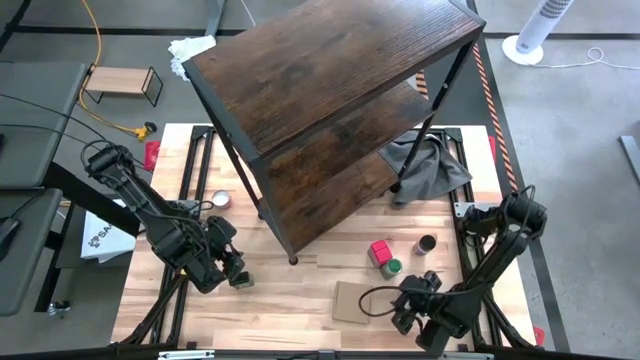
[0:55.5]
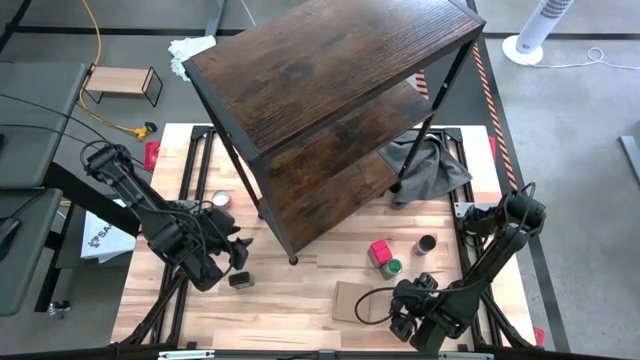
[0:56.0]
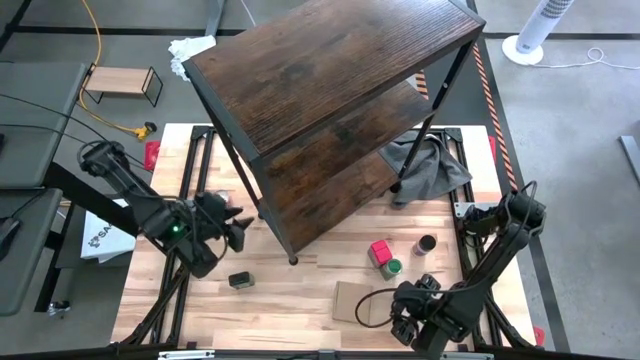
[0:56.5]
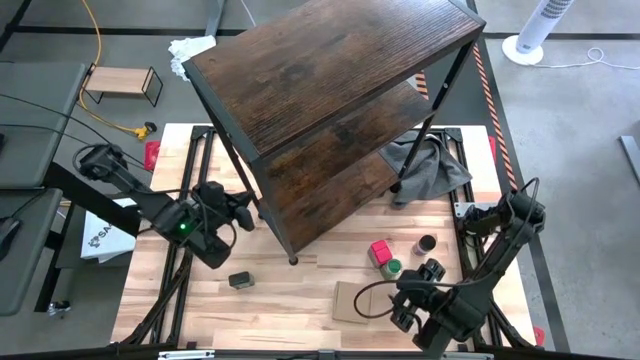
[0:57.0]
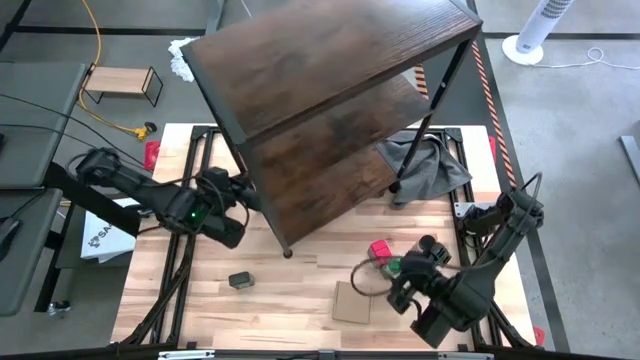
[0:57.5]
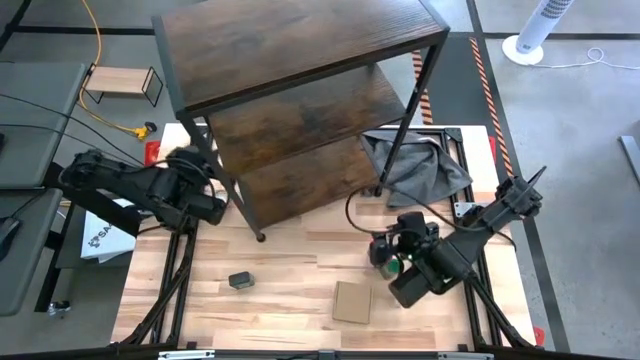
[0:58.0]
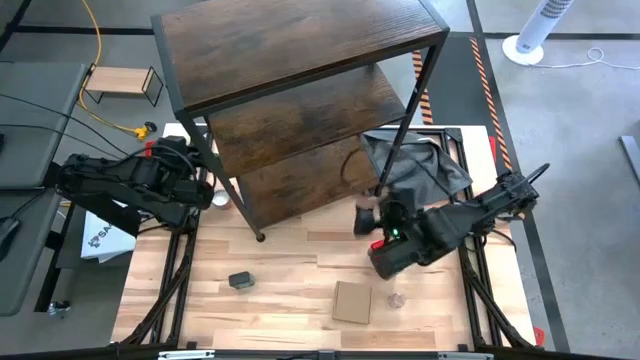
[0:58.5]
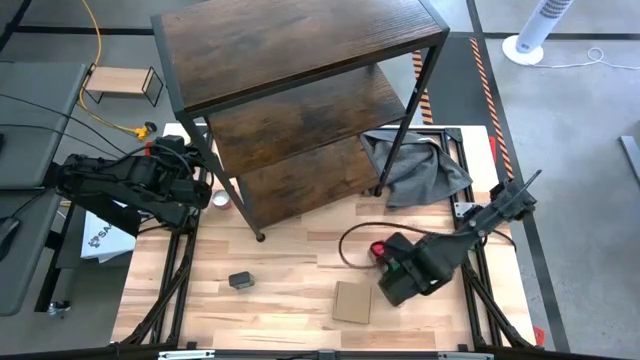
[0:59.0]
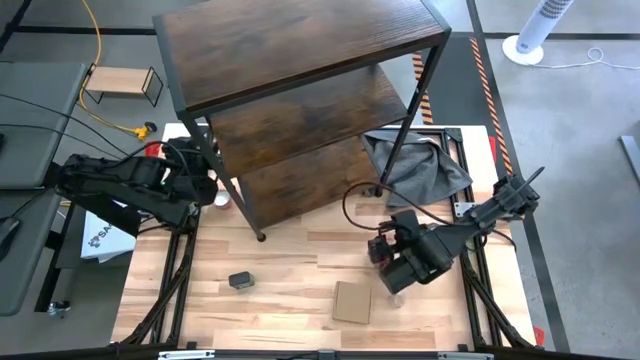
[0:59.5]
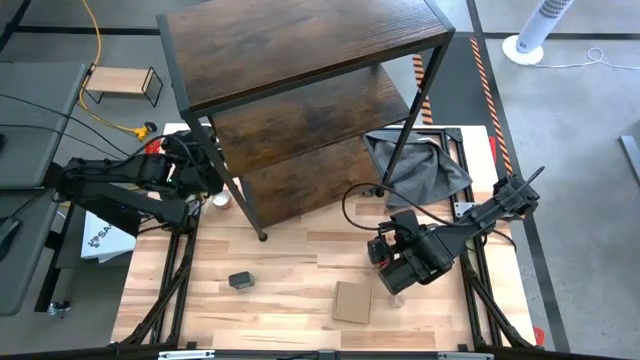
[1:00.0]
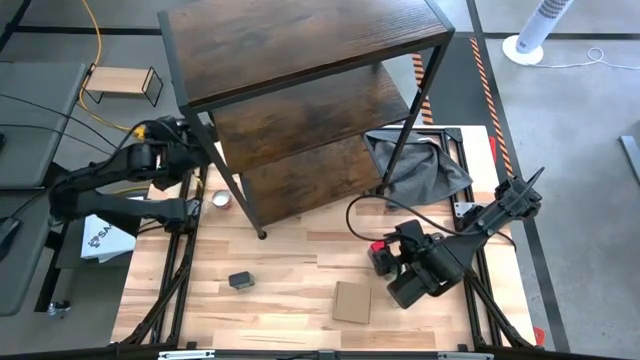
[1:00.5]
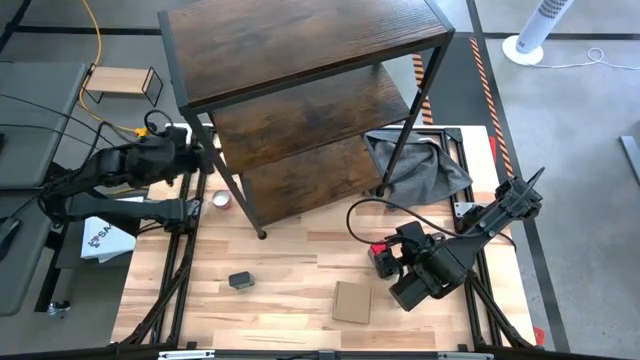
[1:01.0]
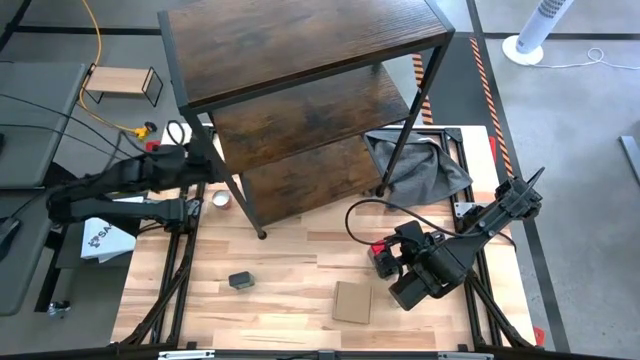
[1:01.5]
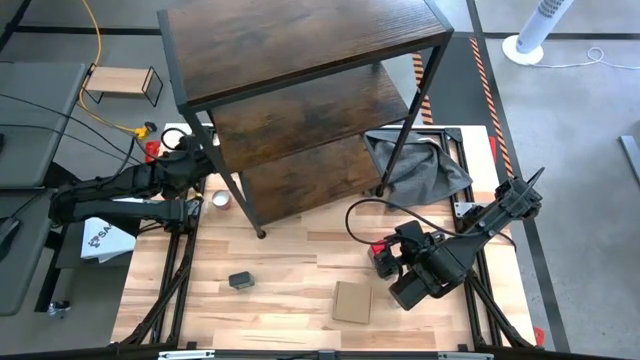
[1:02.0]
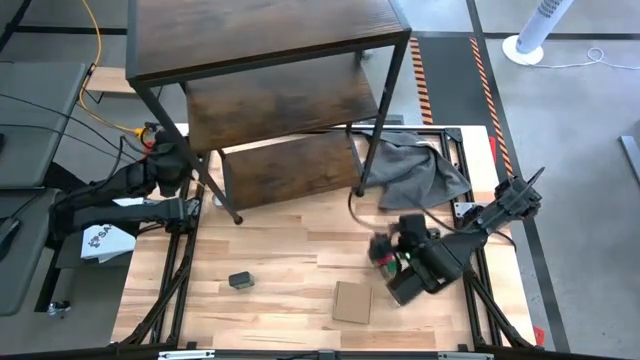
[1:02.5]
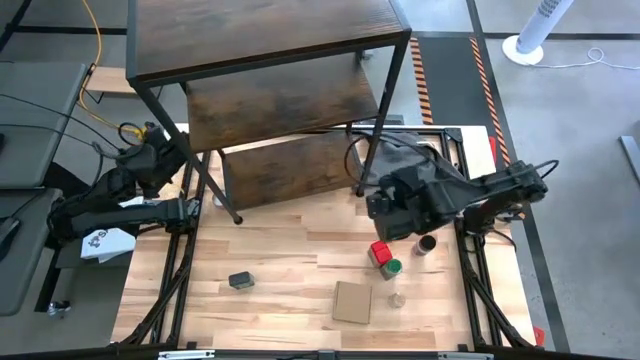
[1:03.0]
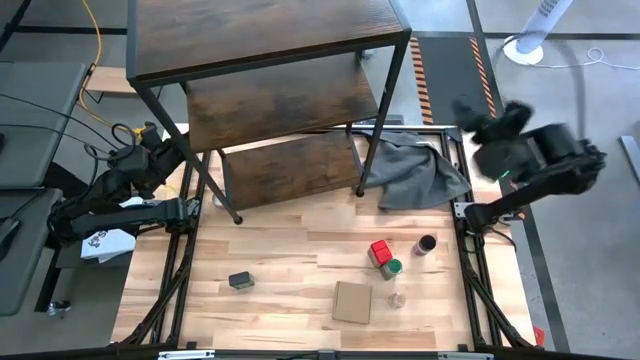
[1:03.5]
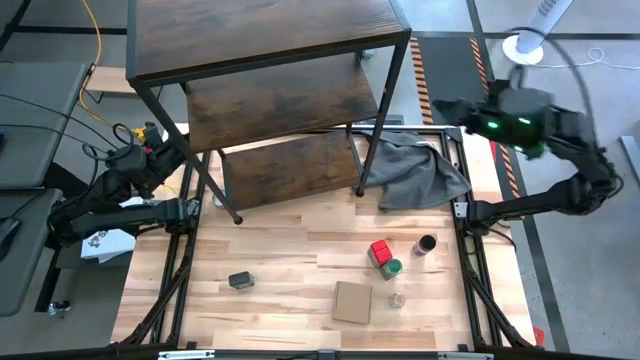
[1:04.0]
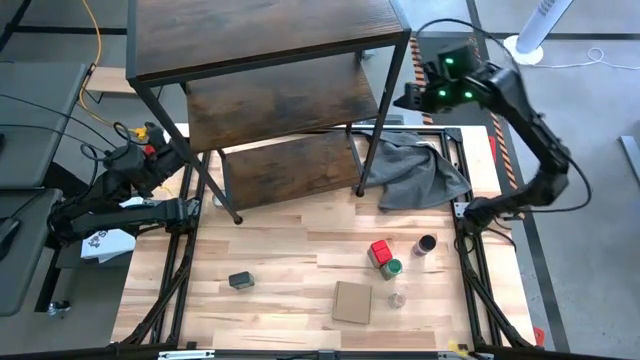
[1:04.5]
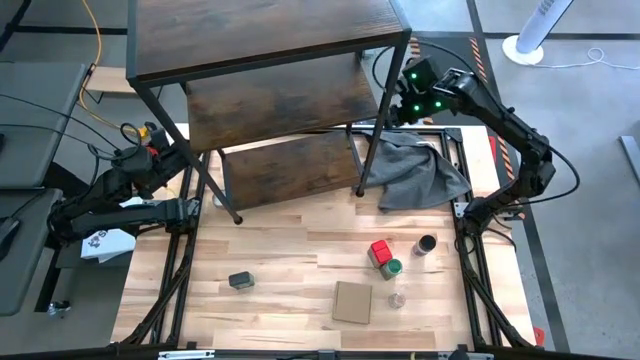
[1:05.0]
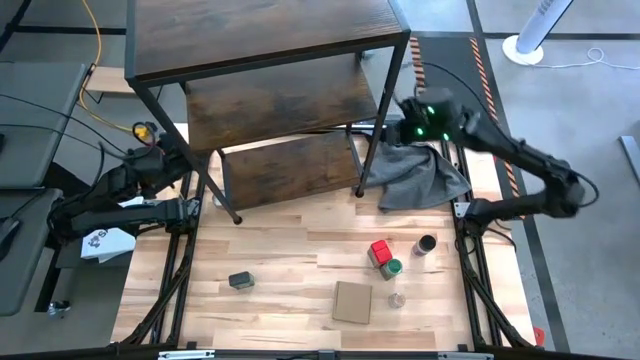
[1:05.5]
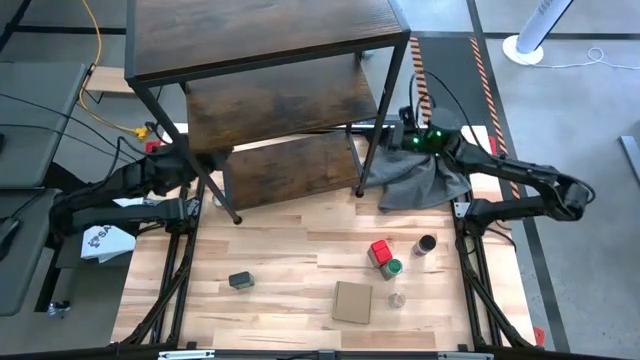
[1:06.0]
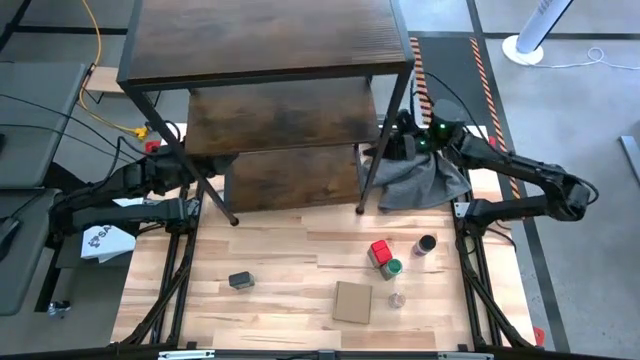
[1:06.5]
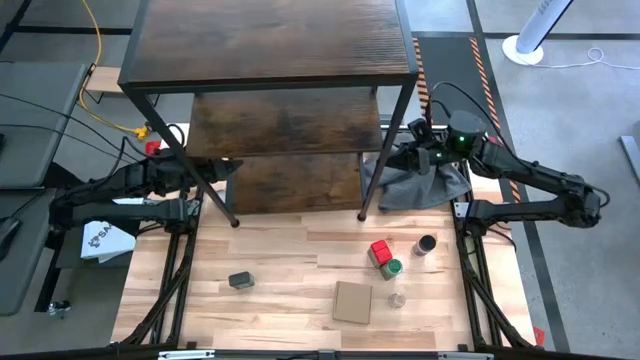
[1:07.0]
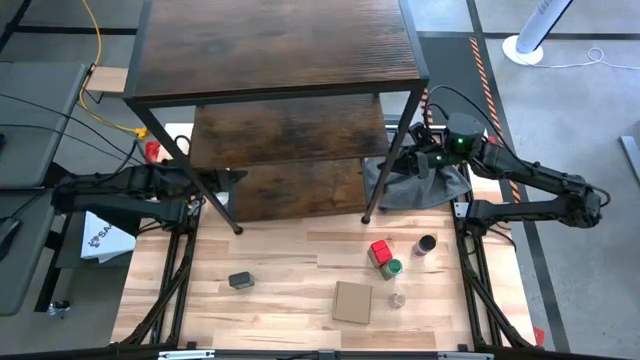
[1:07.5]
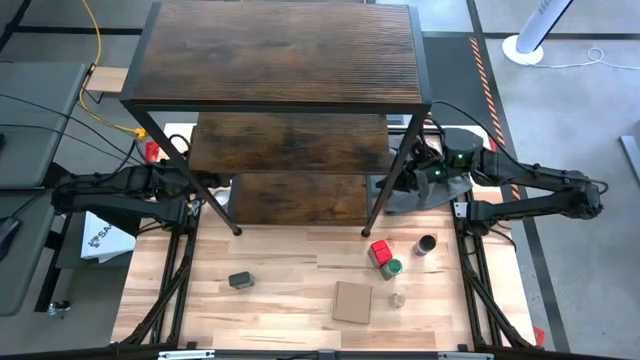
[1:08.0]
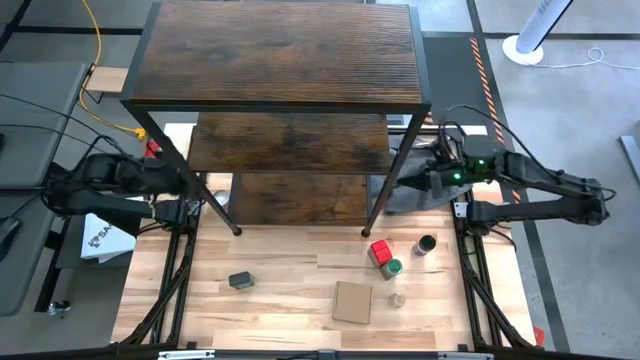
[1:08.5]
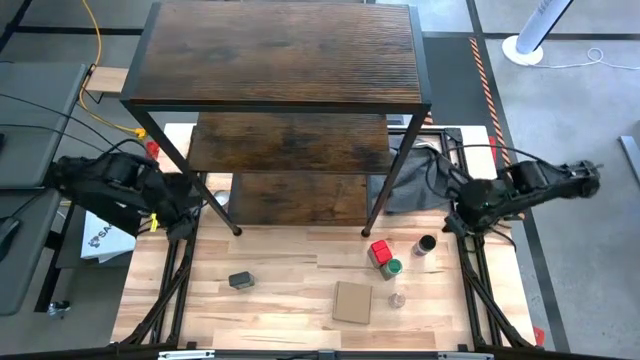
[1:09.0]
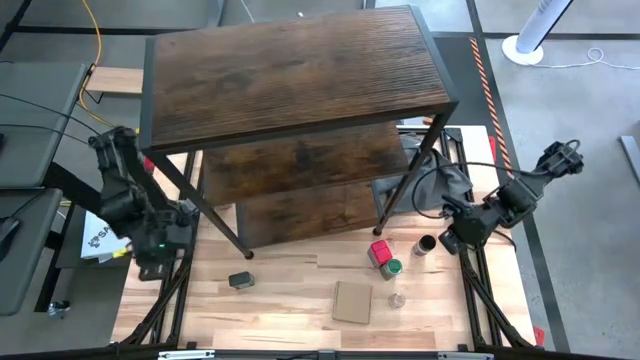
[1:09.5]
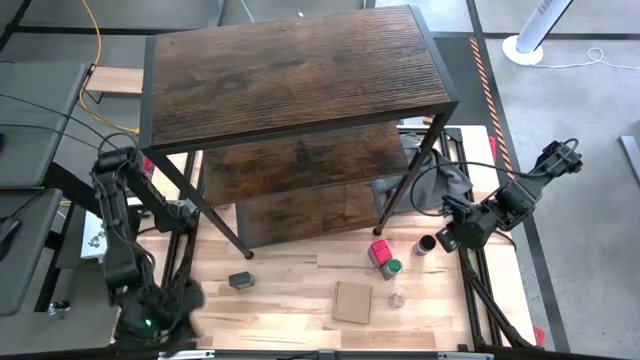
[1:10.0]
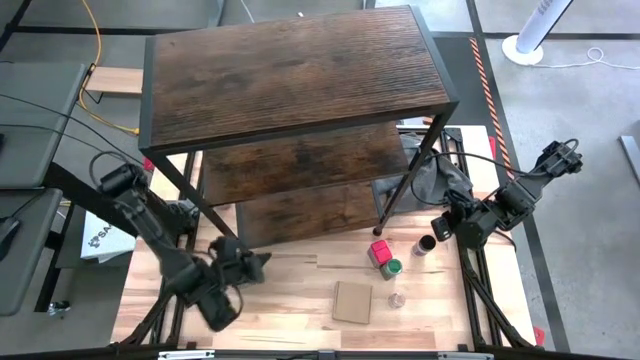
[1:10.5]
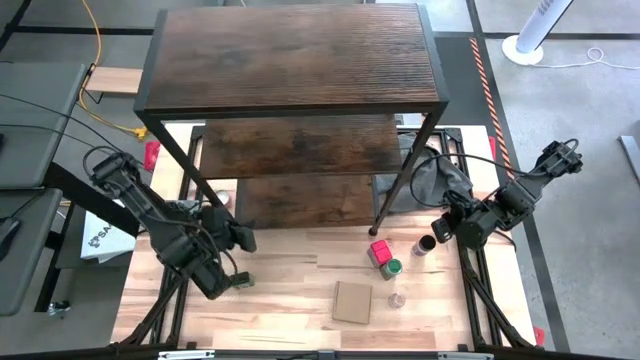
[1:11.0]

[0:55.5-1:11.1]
Task: Shelf spices
Adjust the shelf

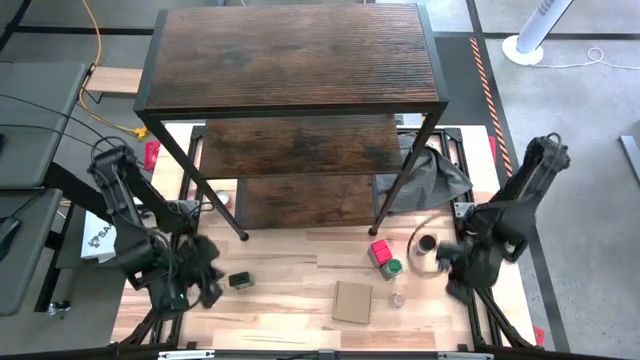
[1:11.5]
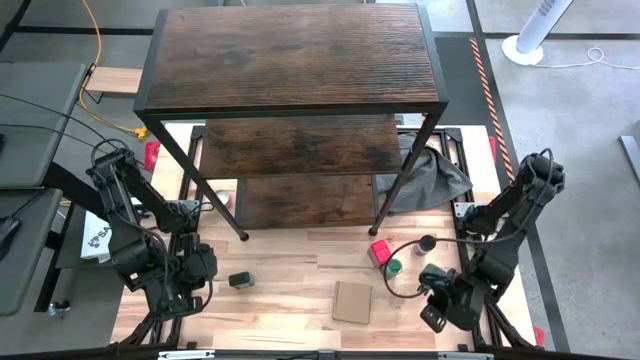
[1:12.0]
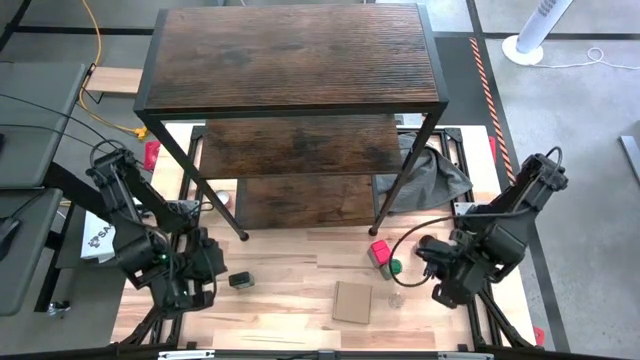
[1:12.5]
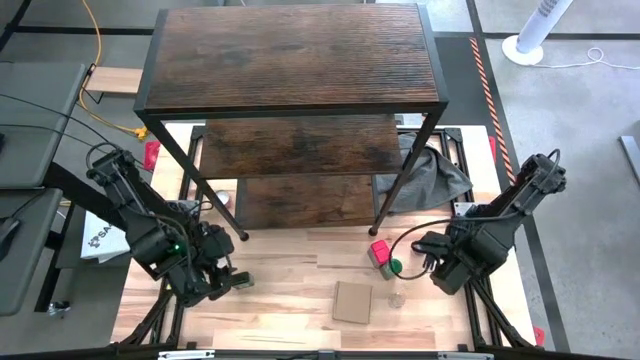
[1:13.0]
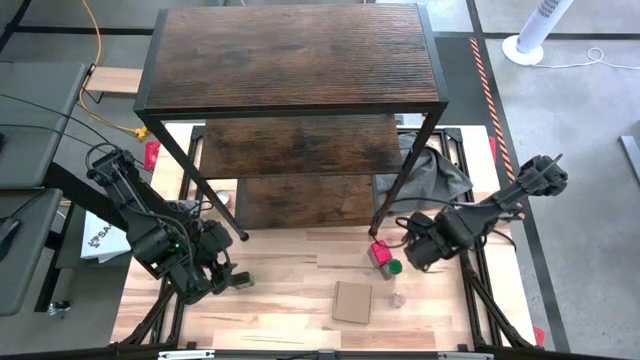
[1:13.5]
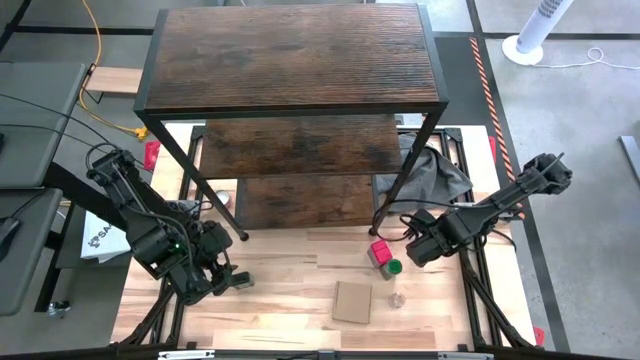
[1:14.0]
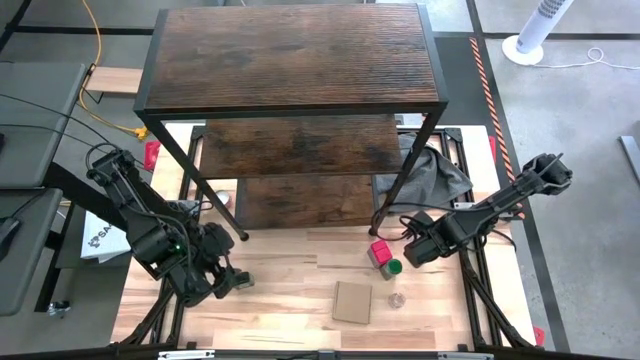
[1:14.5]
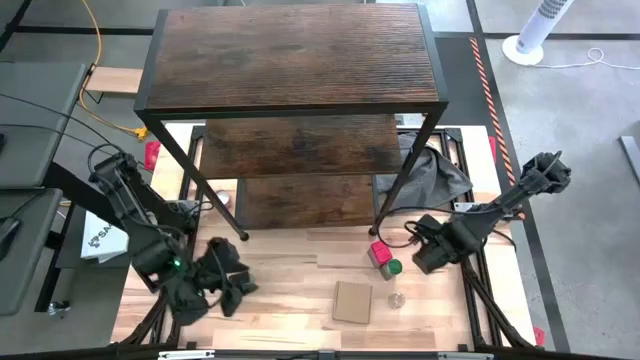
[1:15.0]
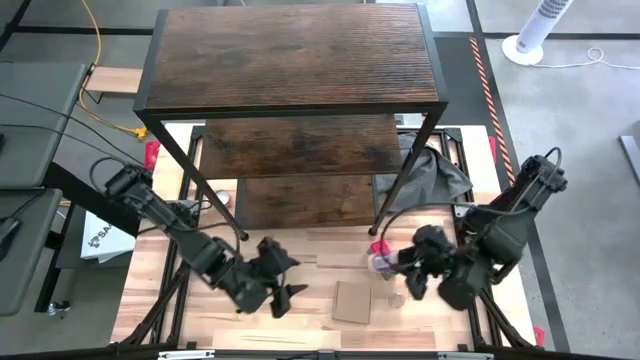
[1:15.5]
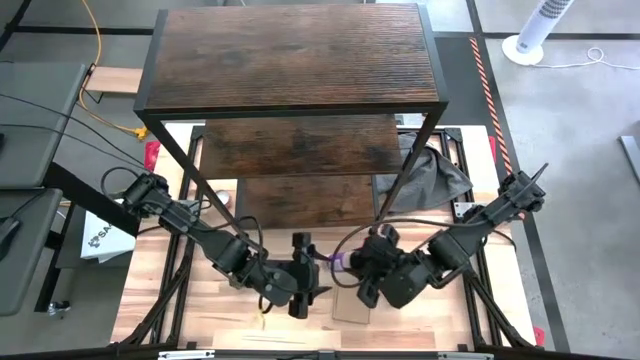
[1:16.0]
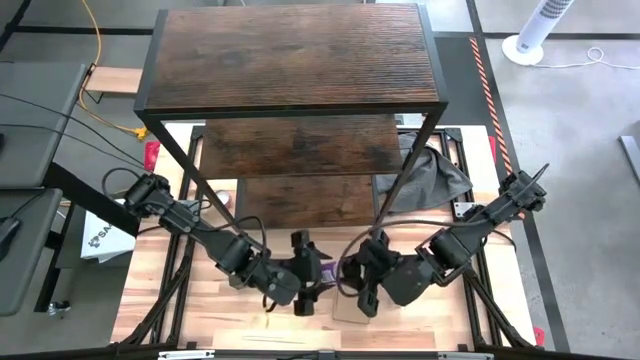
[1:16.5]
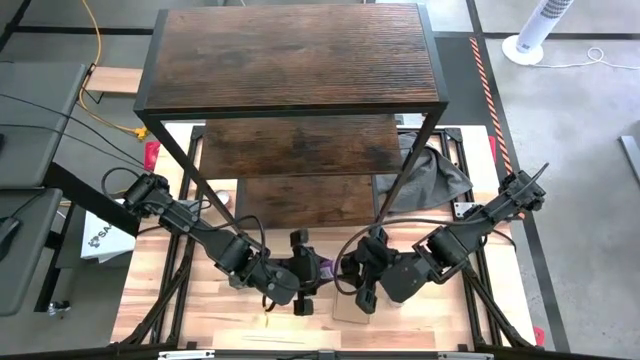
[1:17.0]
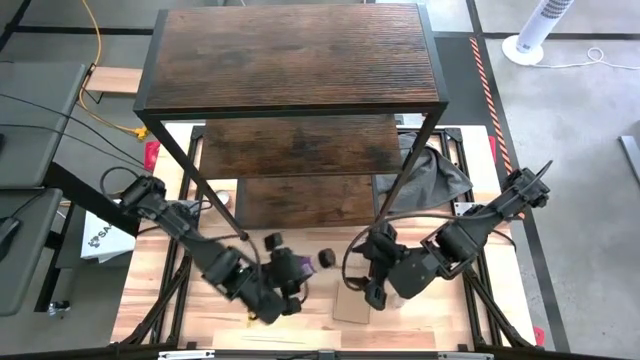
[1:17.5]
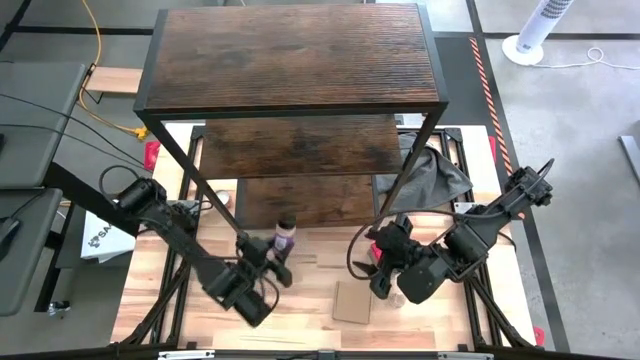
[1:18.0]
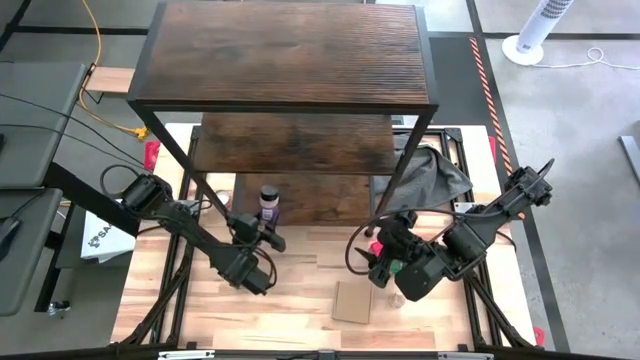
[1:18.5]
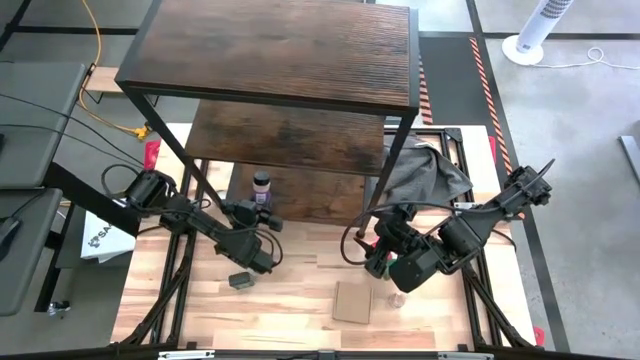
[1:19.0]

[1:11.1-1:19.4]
Put the black seasoning bottle on the shelf
